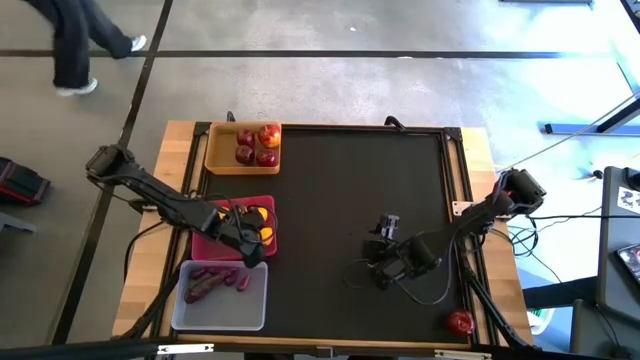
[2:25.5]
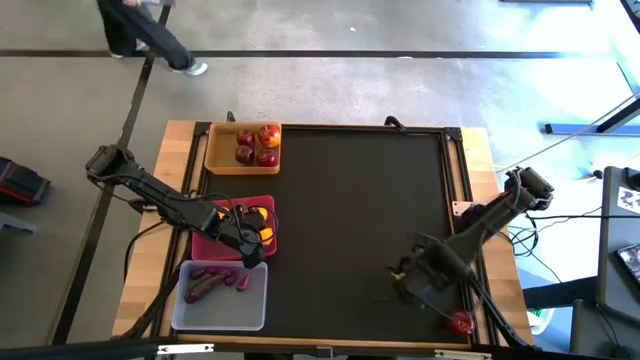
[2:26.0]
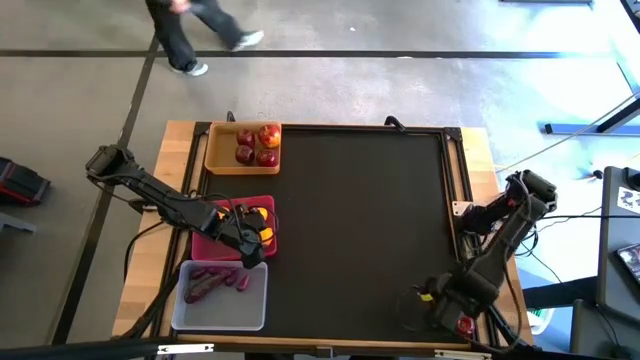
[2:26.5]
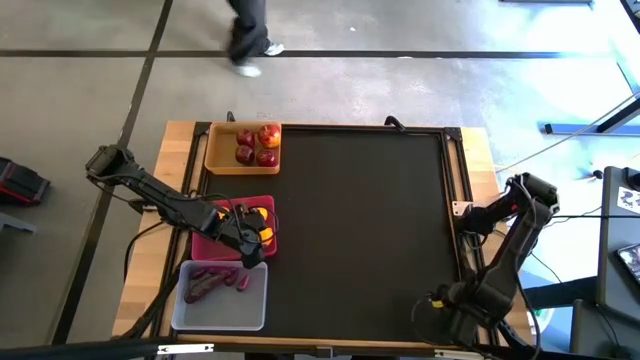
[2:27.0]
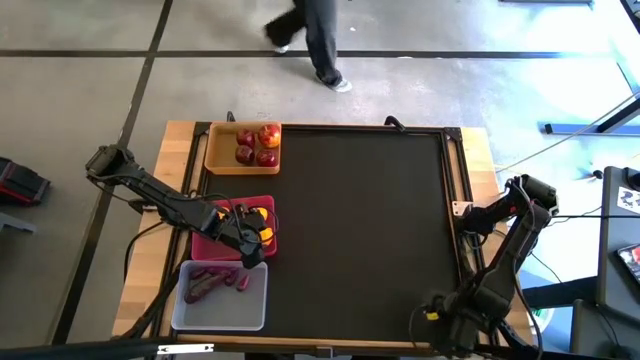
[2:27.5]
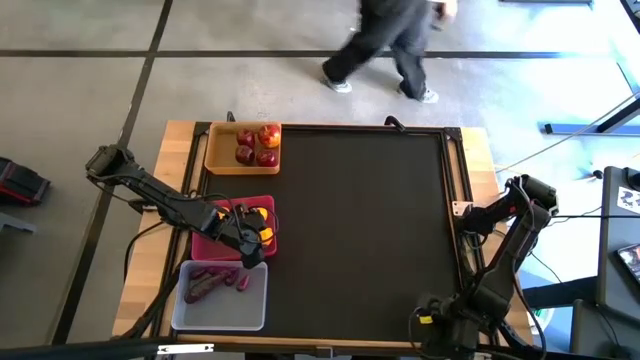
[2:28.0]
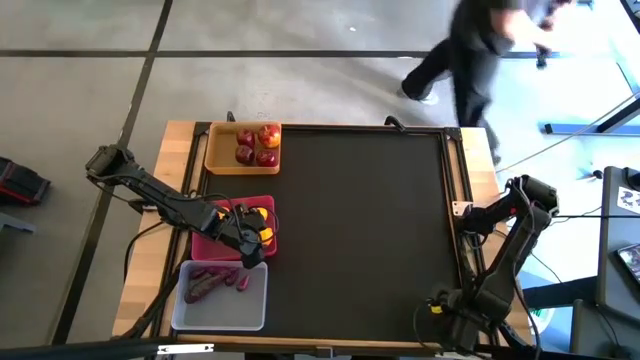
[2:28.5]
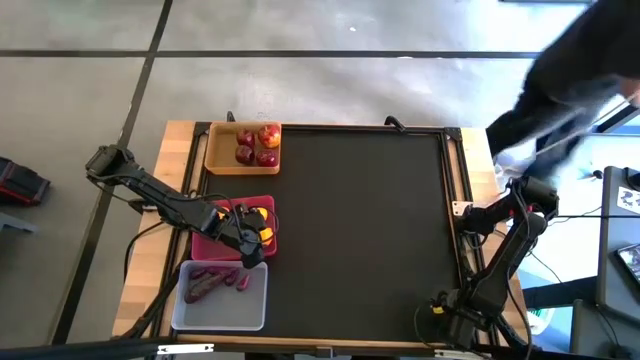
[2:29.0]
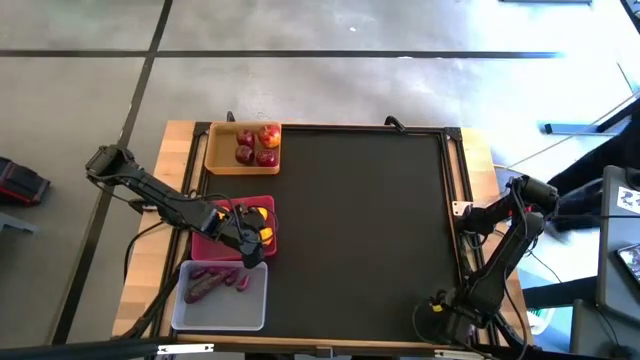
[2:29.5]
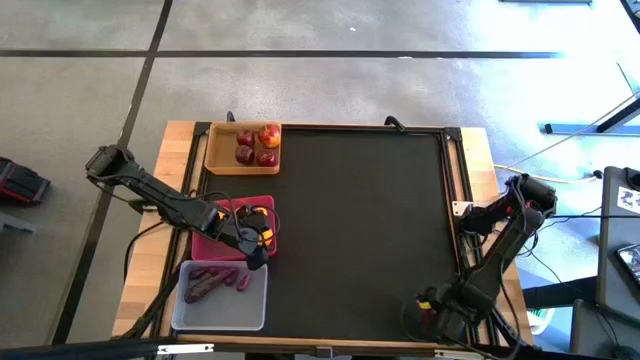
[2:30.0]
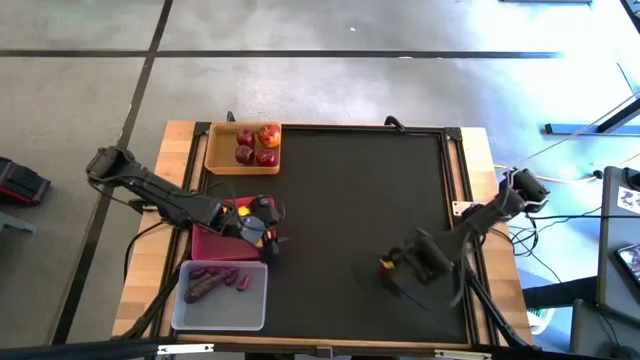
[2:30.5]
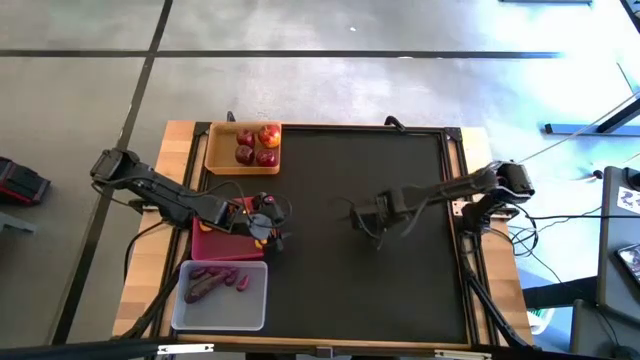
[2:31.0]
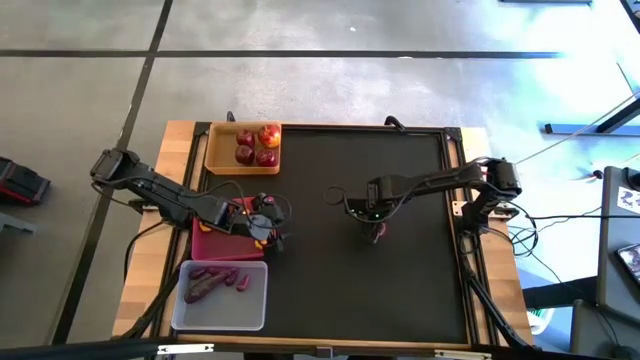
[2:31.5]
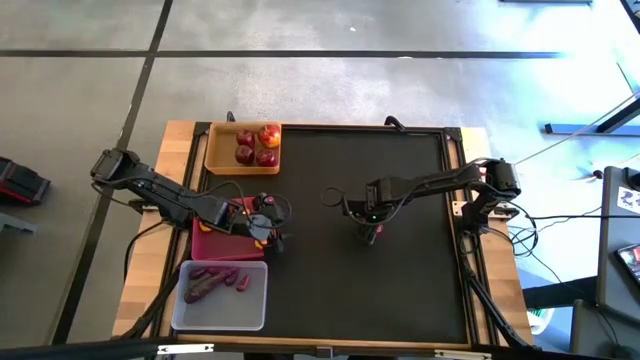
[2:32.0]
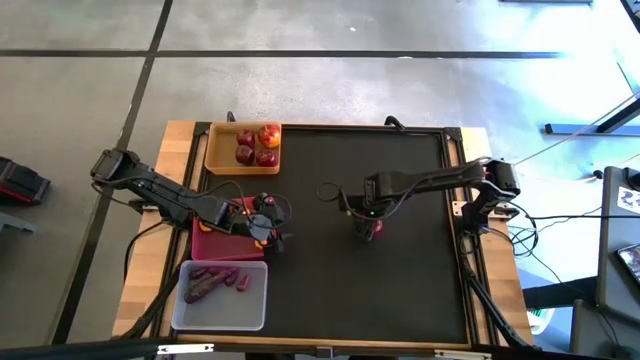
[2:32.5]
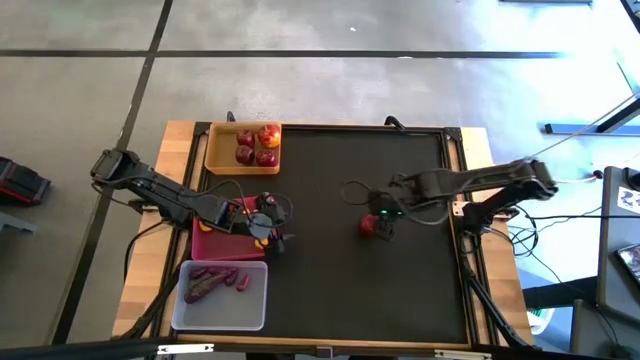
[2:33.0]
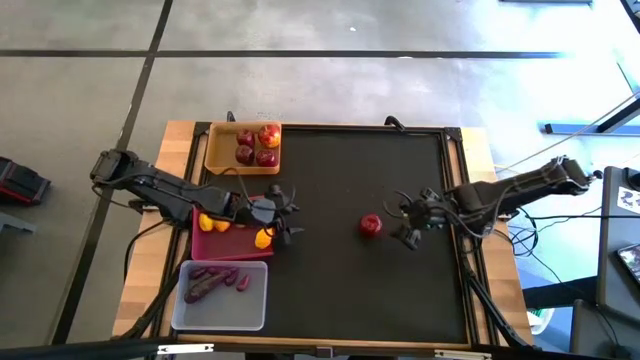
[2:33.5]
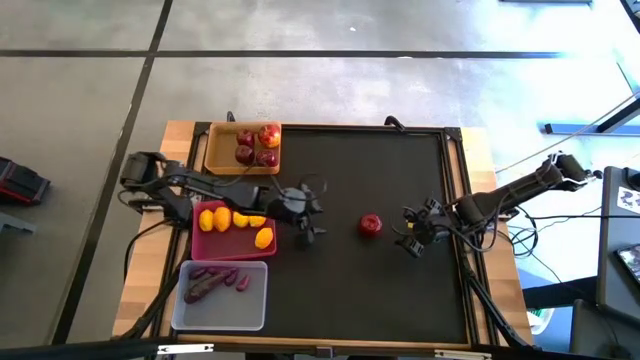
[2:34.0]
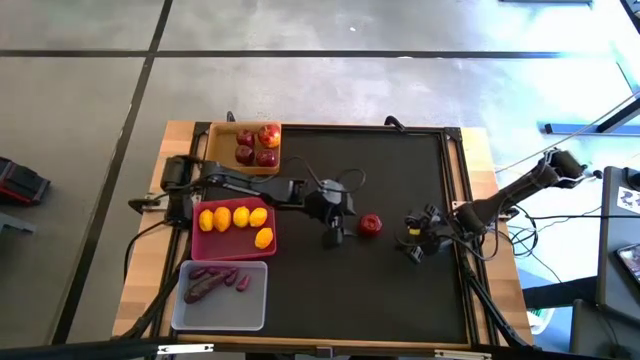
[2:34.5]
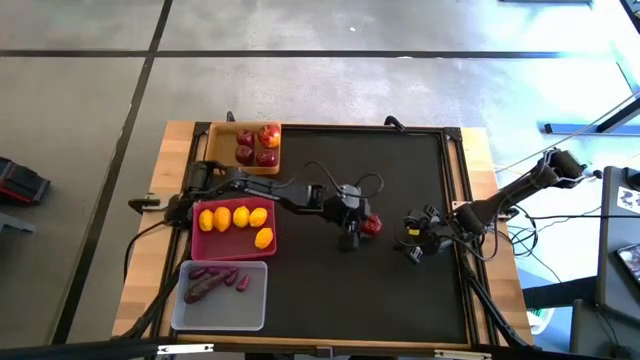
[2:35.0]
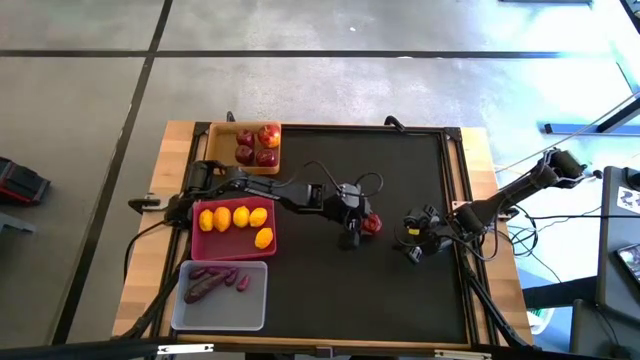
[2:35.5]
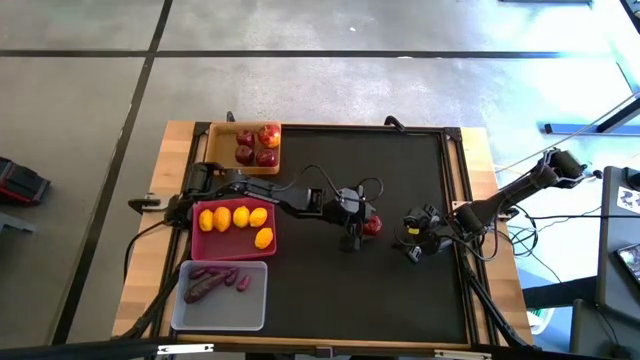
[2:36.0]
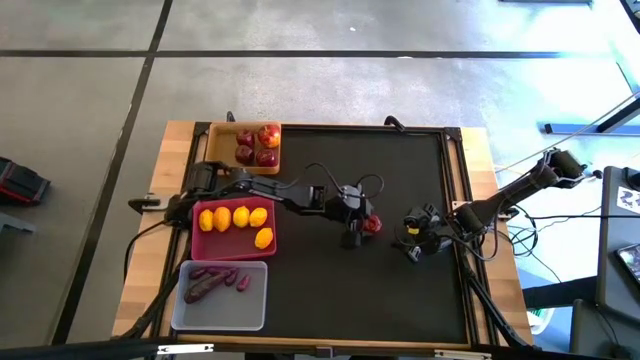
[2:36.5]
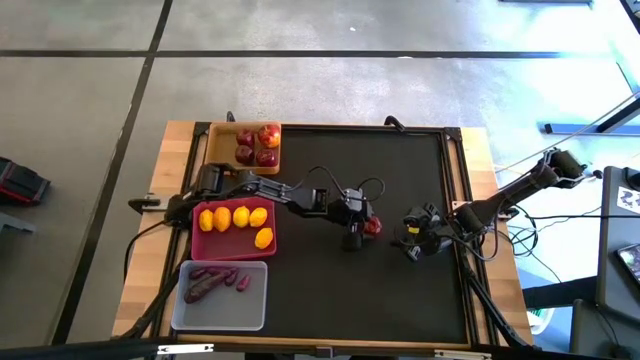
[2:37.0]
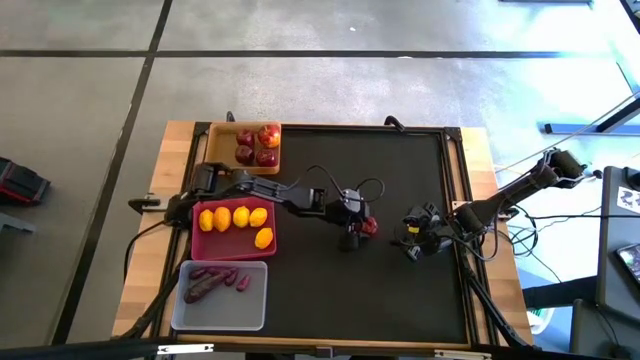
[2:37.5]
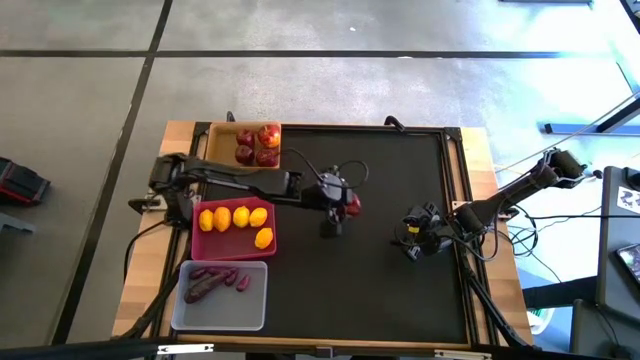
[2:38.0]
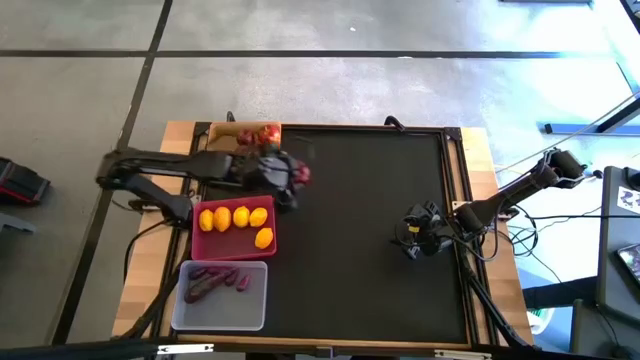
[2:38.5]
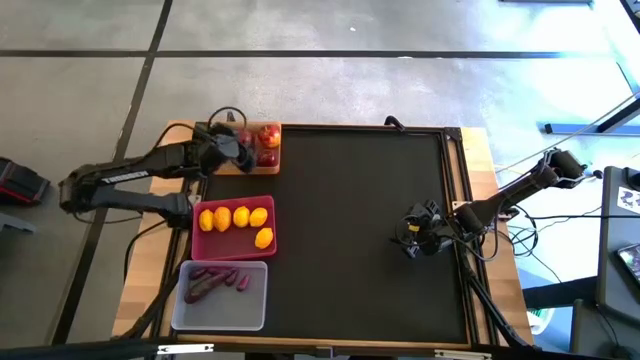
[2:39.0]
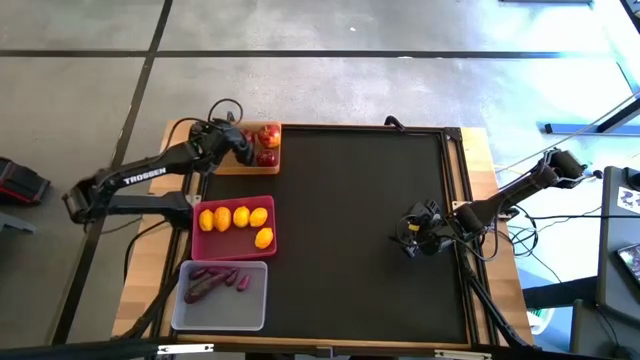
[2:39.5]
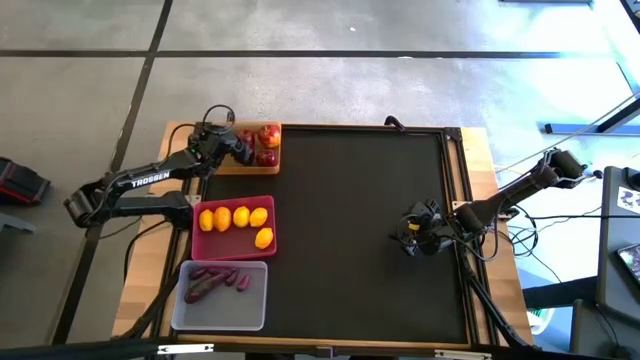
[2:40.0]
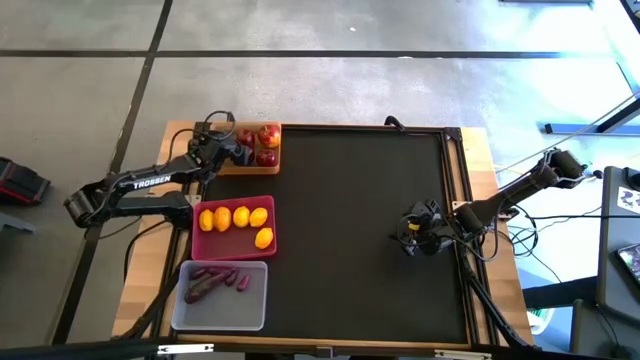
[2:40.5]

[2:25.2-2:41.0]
Task: Sort produce into baskets
Put the apple into the orange bin

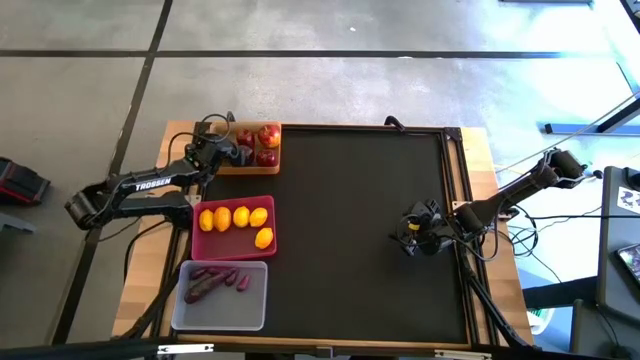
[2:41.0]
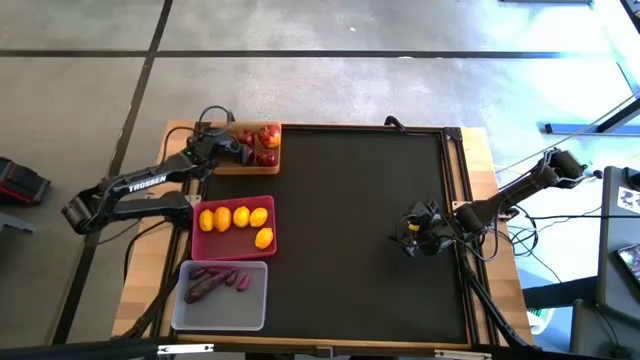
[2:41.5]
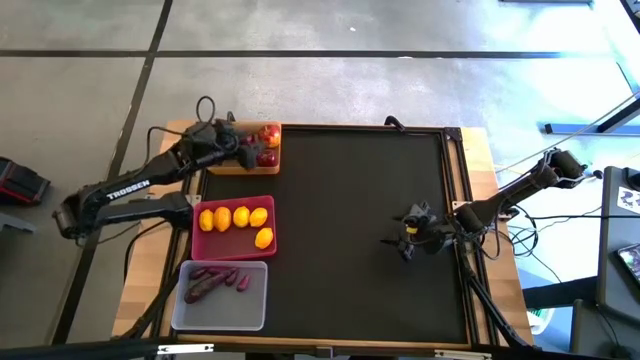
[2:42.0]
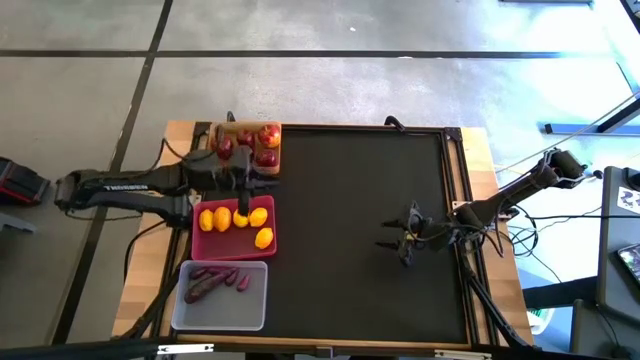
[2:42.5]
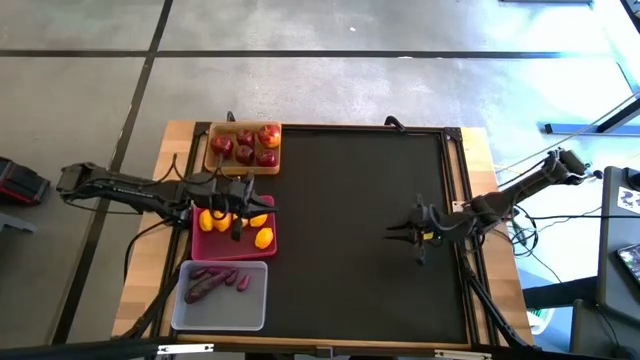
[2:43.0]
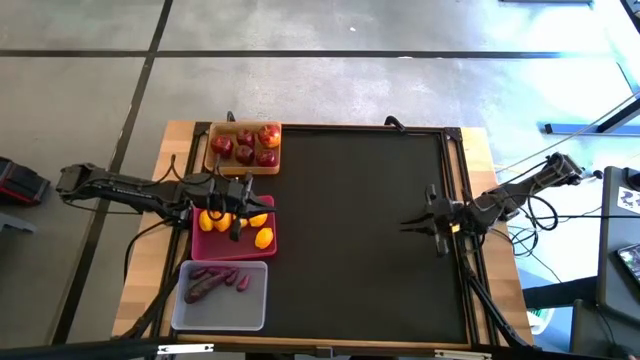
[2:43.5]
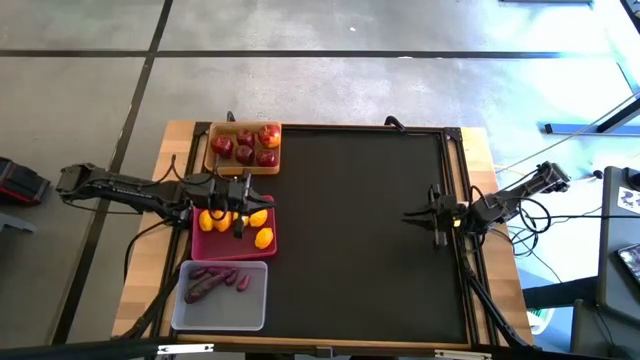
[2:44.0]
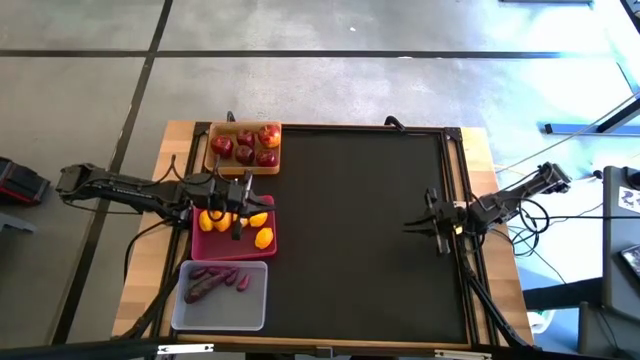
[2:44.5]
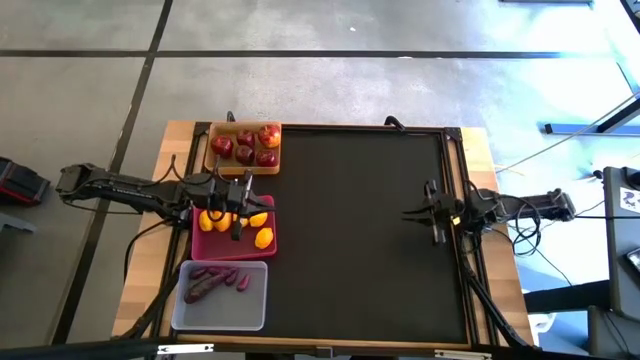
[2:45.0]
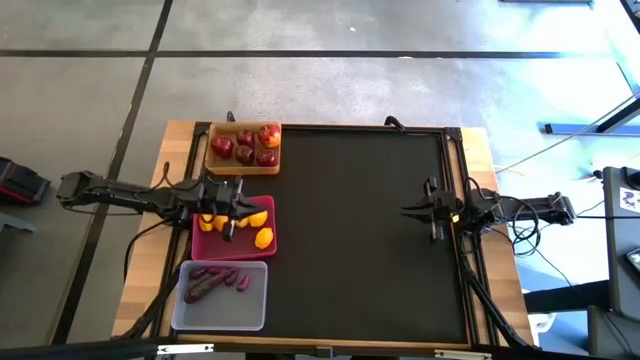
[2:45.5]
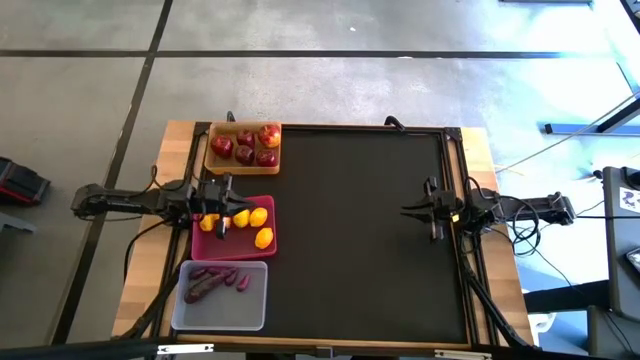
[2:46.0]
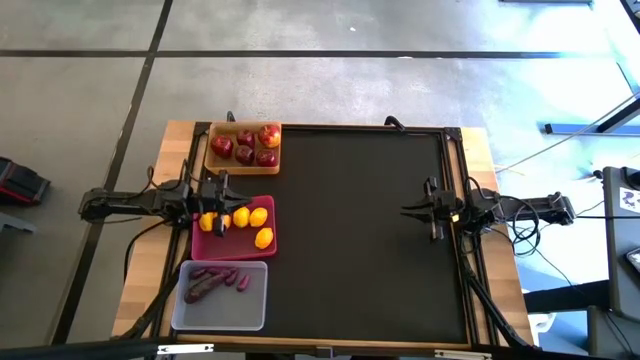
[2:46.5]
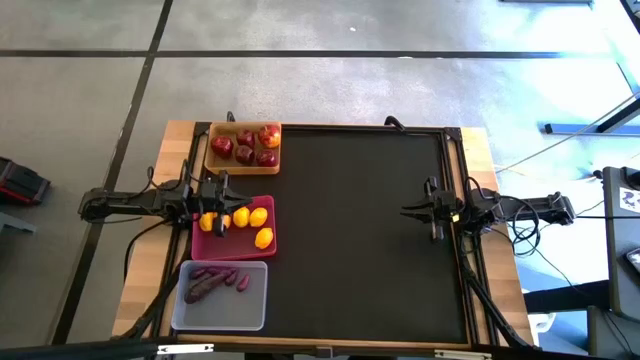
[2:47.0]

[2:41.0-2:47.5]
Return to Home Position
